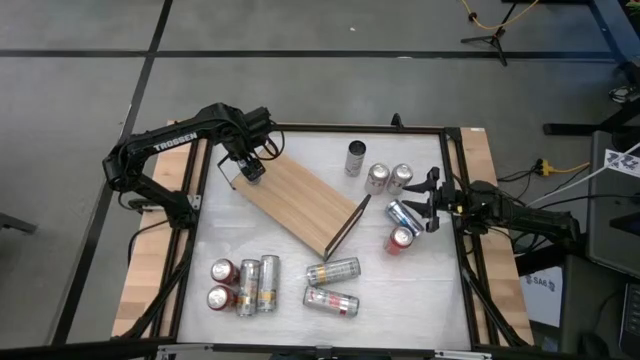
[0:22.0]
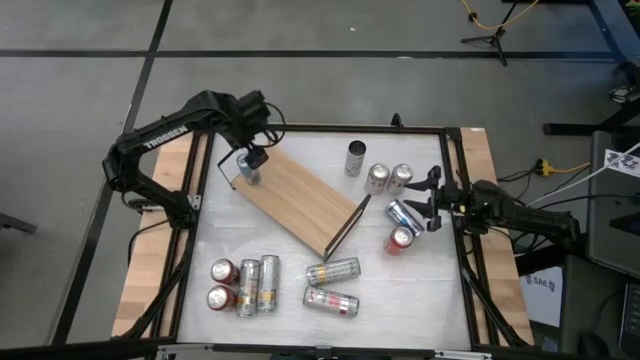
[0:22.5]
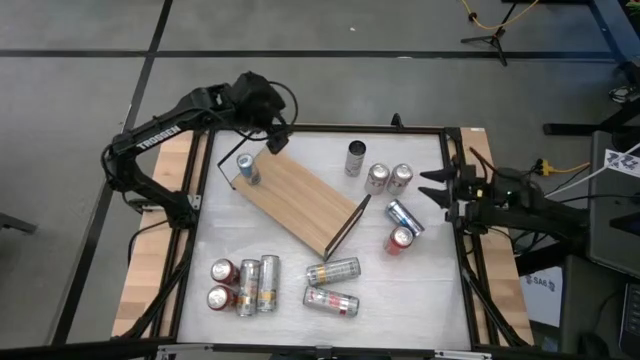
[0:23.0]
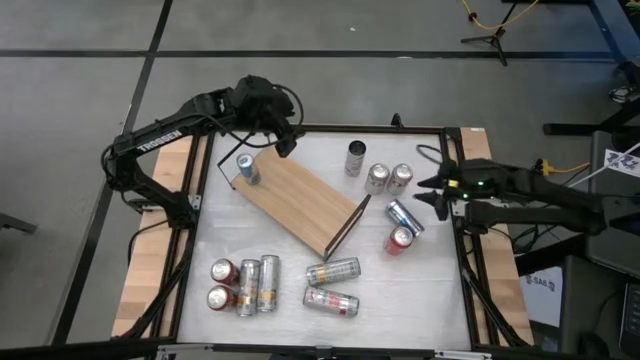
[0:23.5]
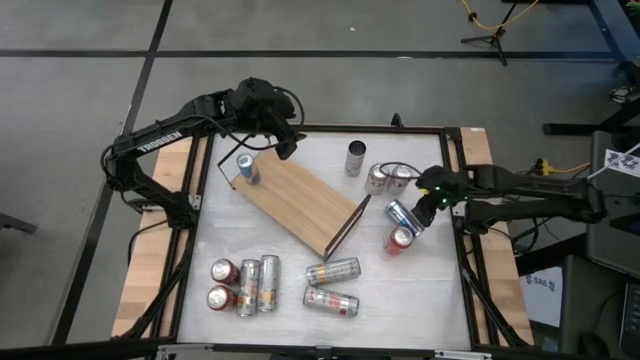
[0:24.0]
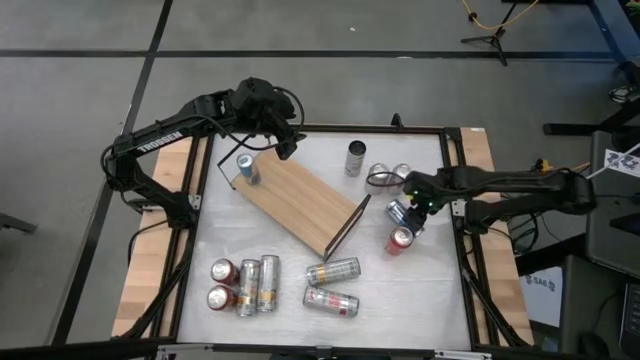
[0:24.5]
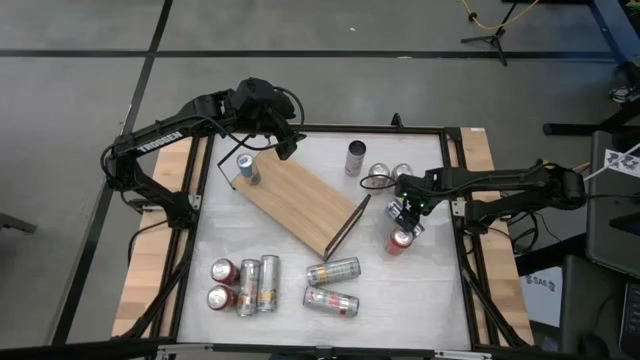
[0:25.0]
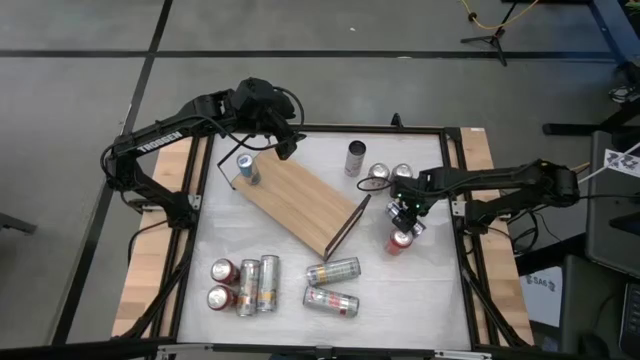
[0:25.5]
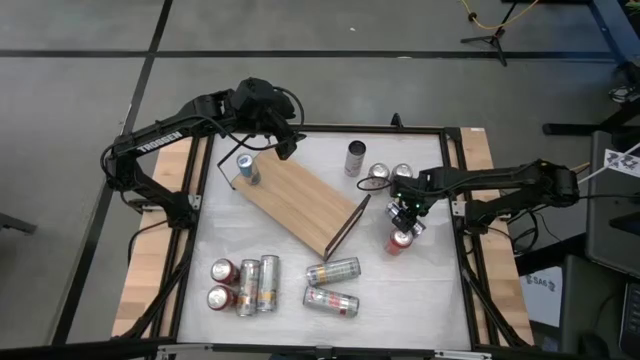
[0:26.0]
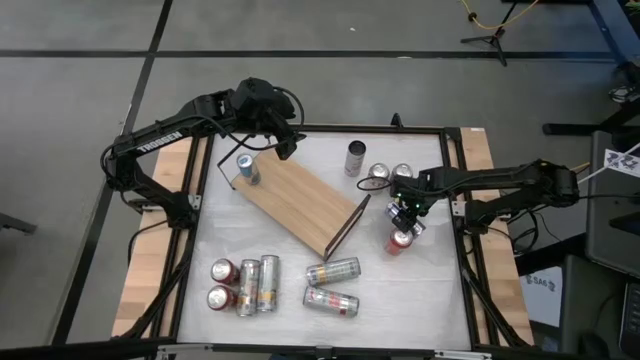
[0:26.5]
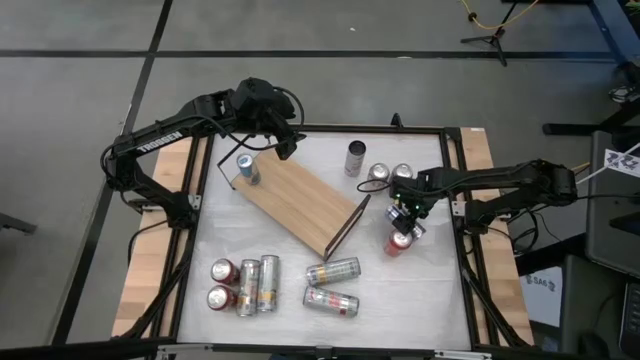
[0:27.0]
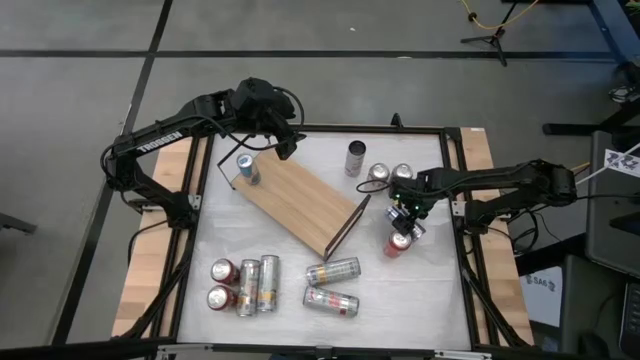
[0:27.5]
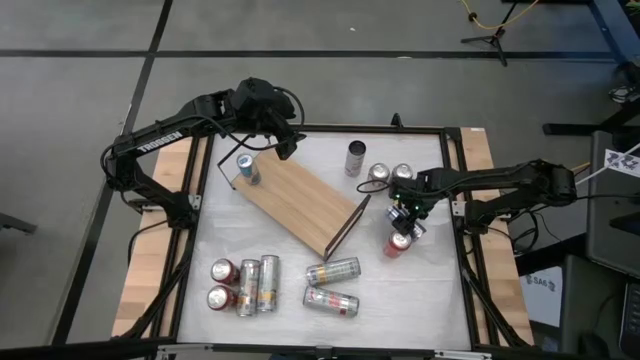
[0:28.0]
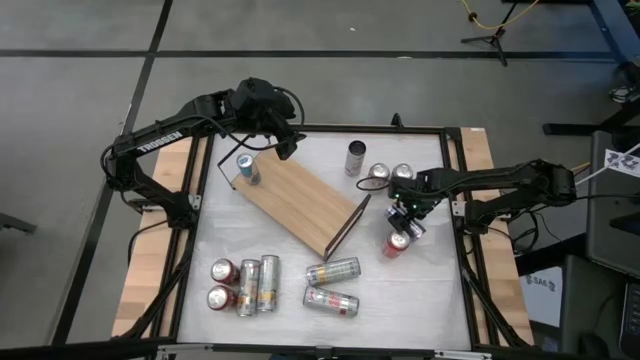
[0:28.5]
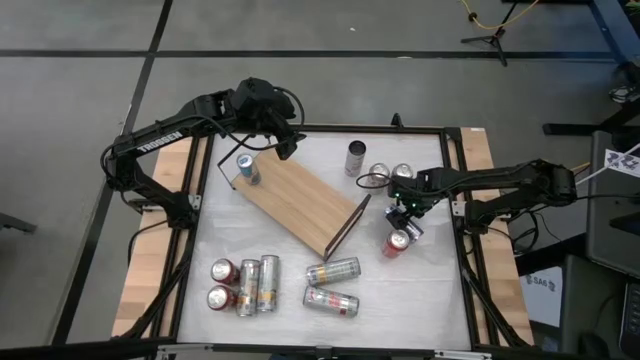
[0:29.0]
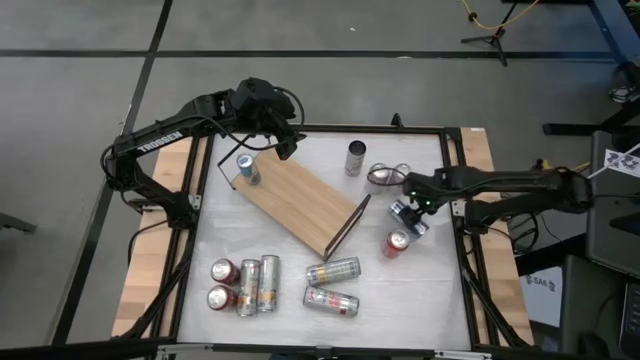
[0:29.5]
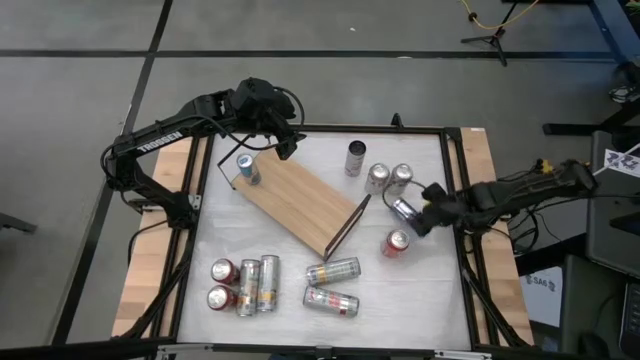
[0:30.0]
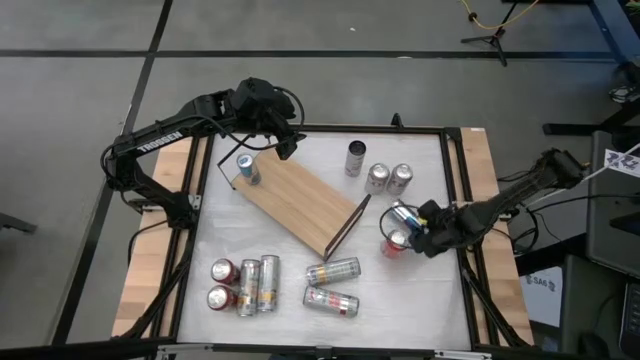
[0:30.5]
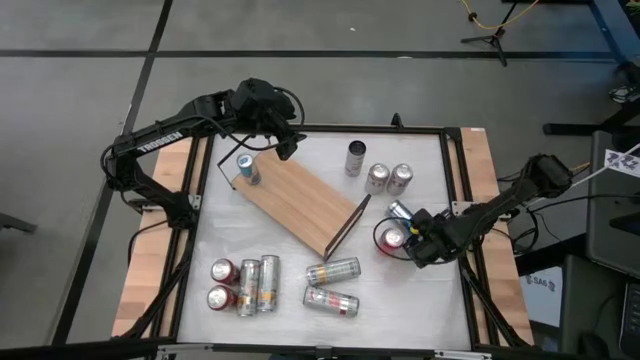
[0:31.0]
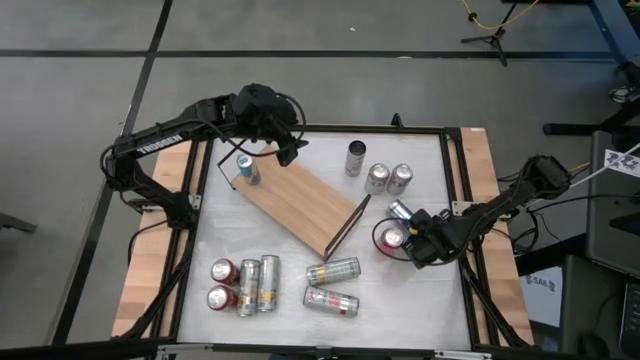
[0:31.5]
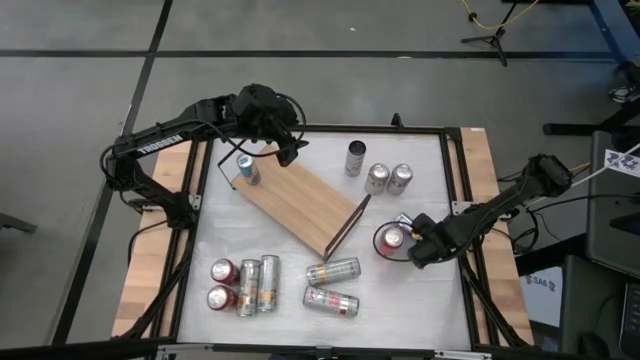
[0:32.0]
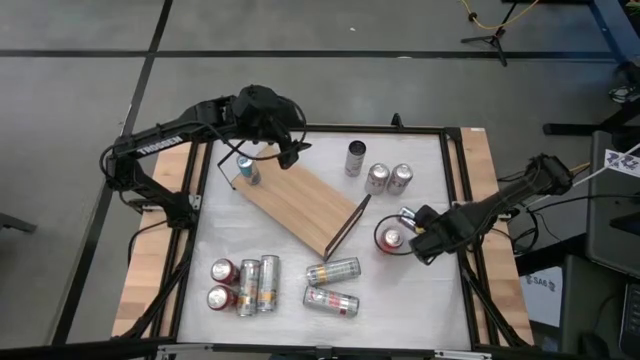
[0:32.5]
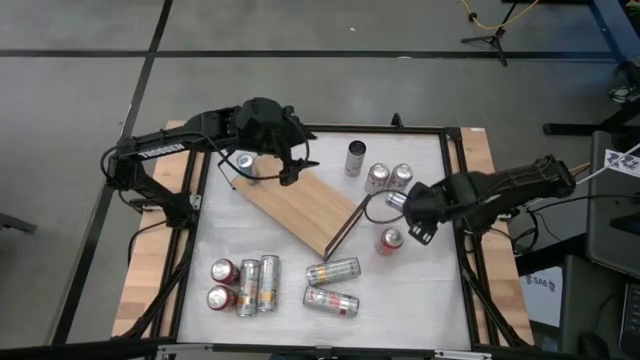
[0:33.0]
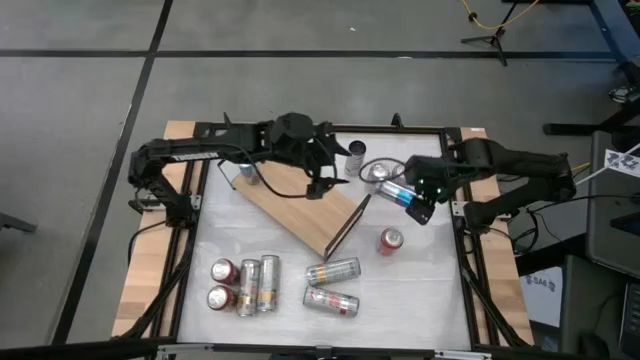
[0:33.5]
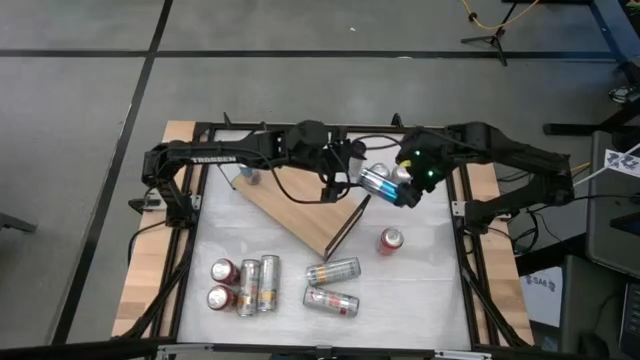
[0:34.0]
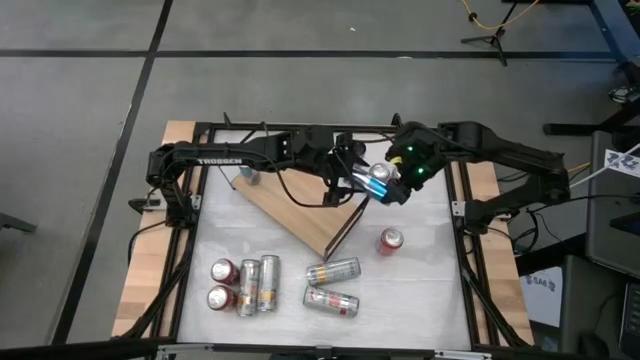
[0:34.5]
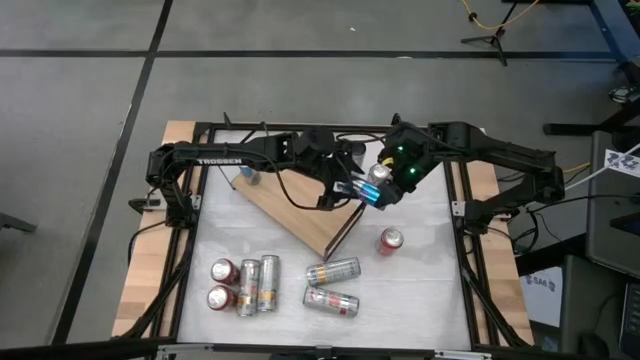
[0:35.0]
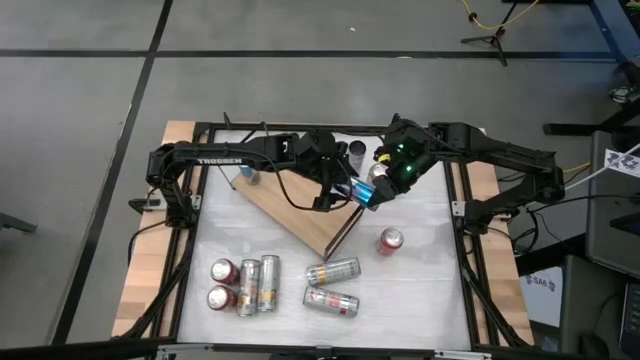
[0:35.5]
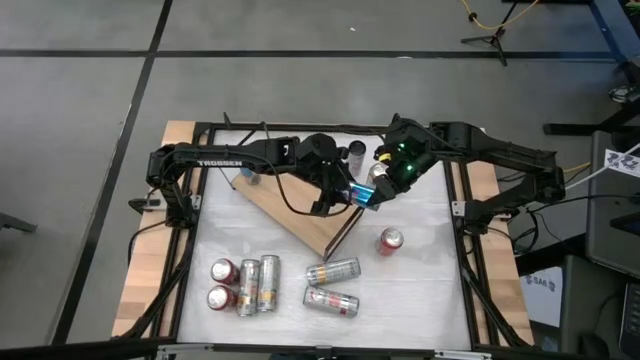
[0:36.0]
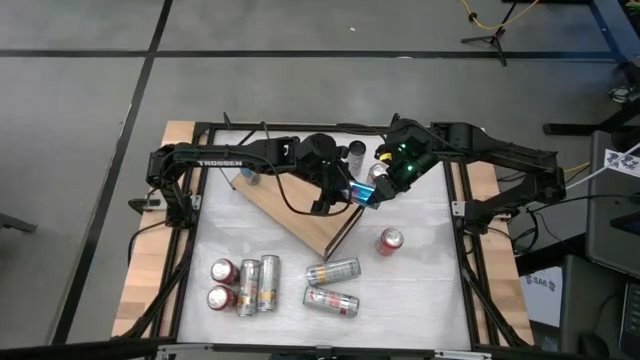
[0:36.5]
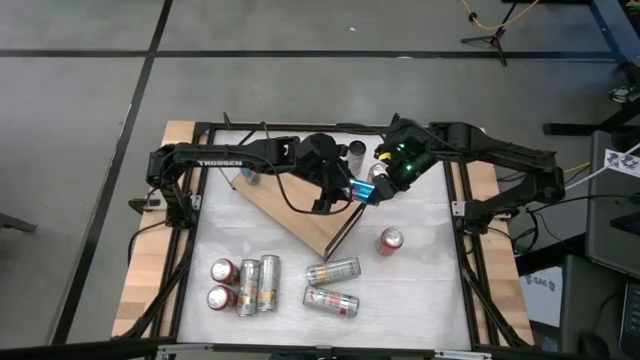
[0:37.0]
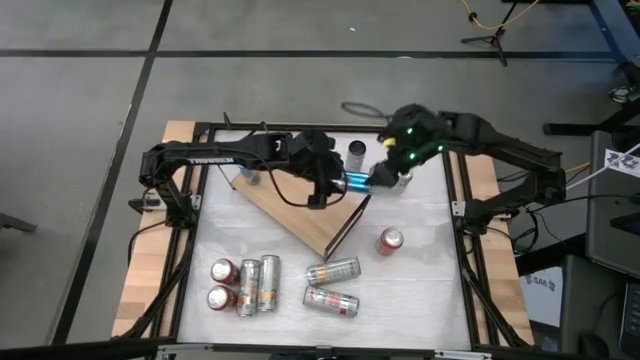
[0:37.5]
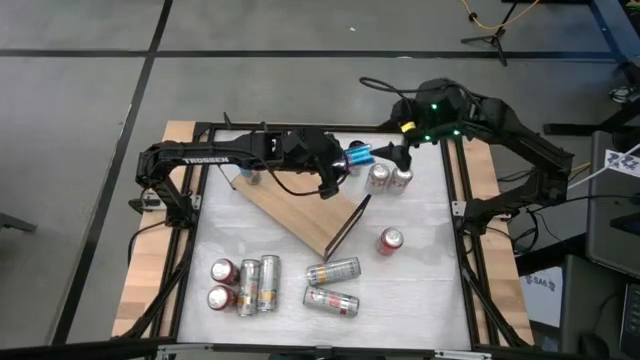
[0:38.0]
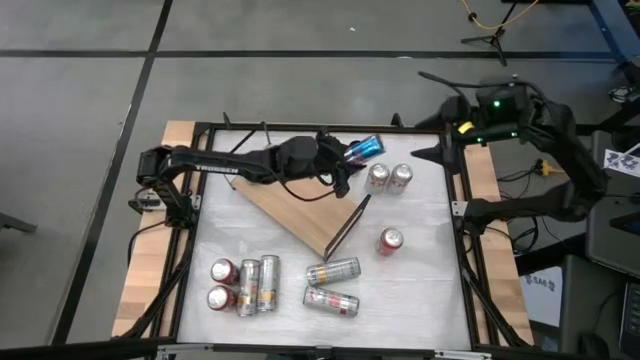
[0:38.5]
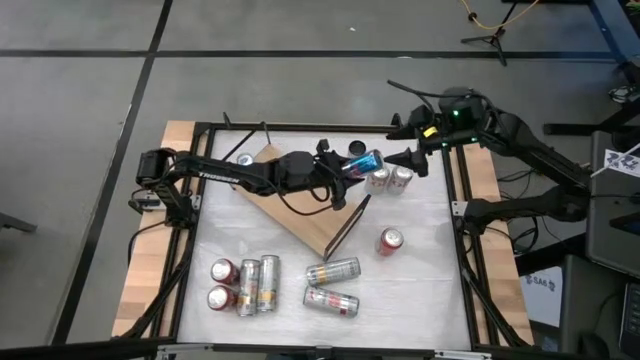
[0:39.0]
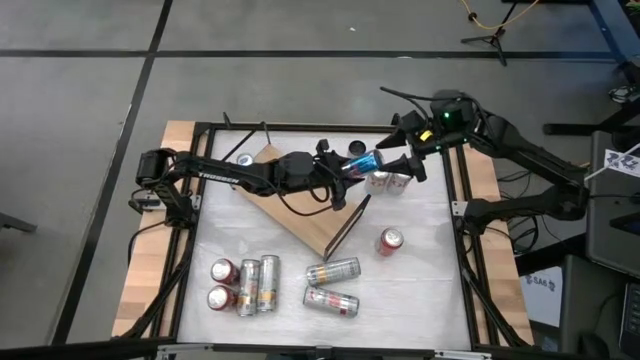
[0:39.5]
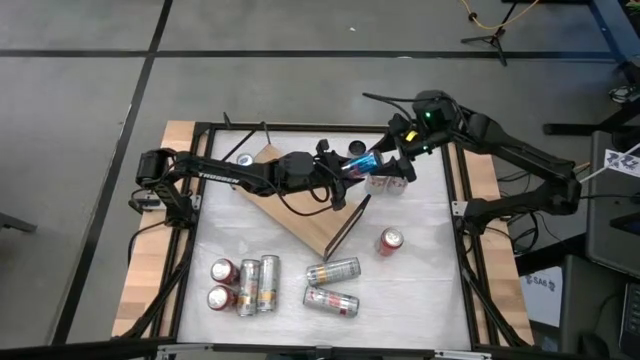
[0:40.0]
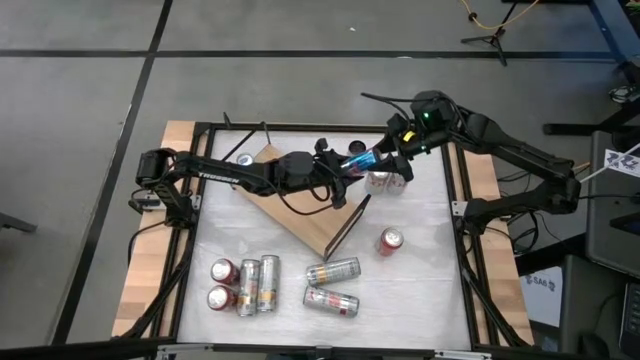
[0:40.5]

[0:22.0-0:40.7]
Task: Place canned beverage on shelf
Put the blue soda can aligned with the blue soda can on the shelf

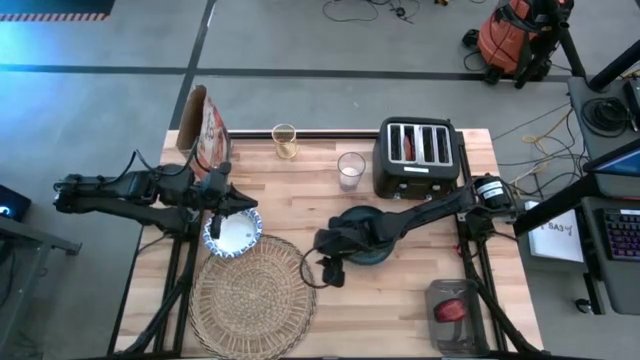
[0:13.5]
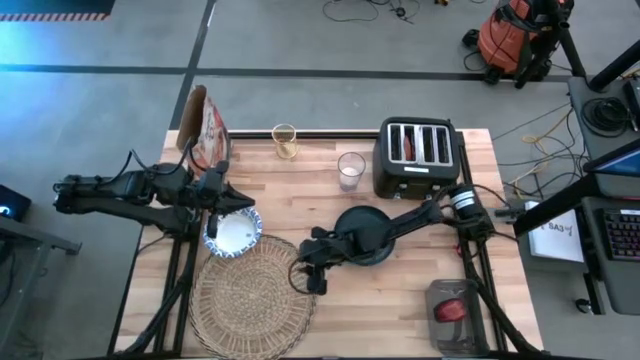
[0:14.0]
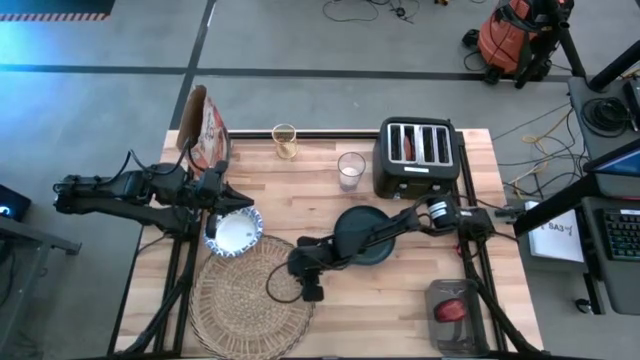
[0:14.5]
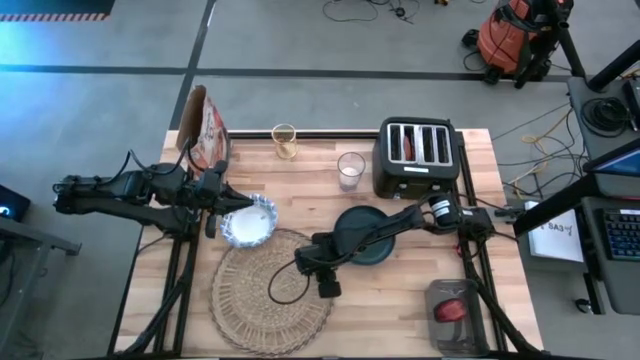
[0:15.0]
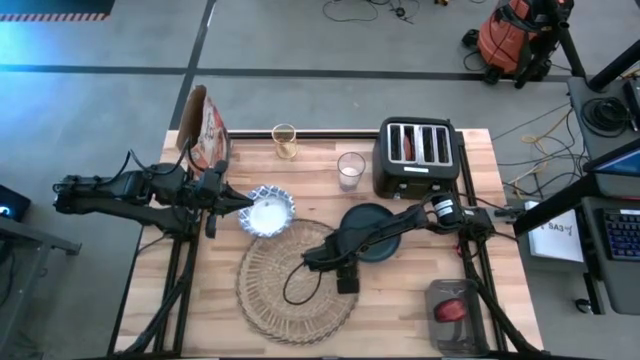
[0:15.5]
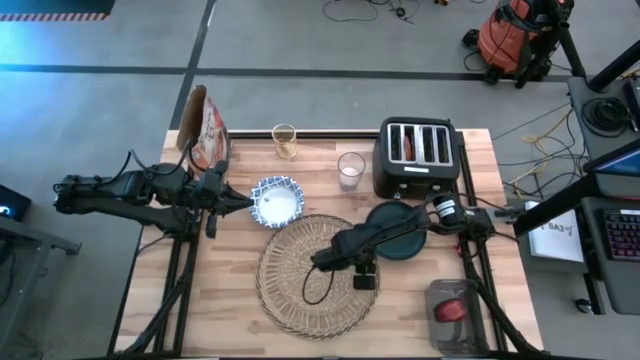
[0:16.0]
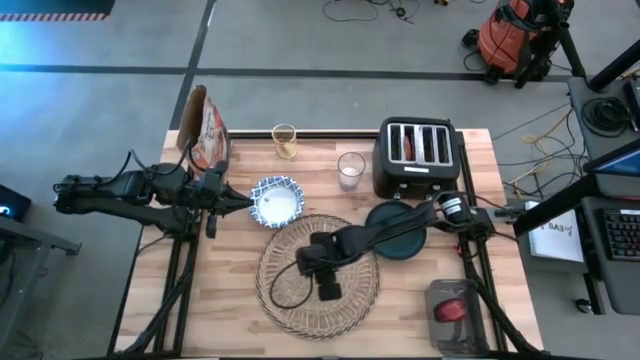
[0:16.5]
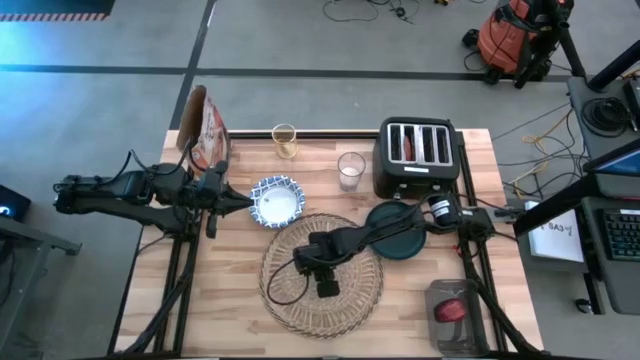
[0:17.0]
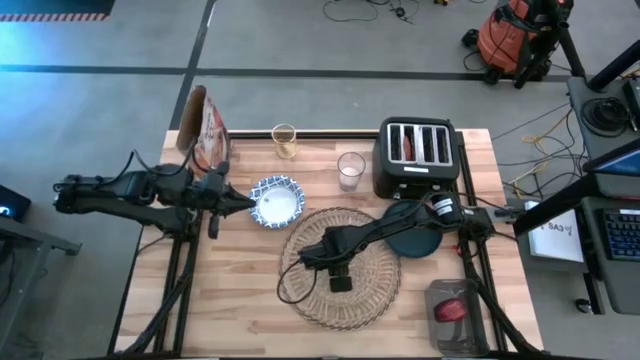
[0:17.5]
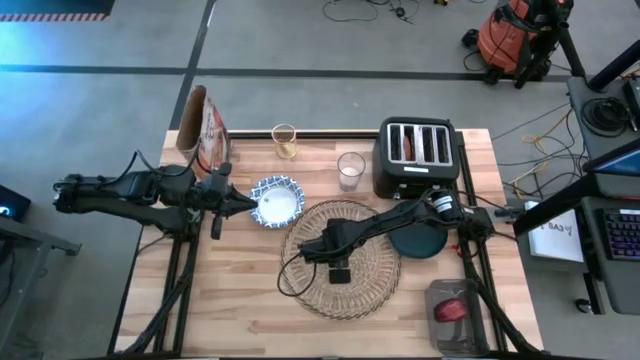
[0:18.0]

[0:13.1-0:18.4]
Task: Arrange a breakfast setting
Move the brown table mat to the center of the table
